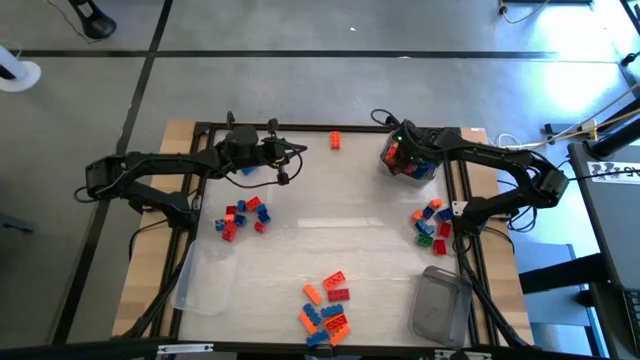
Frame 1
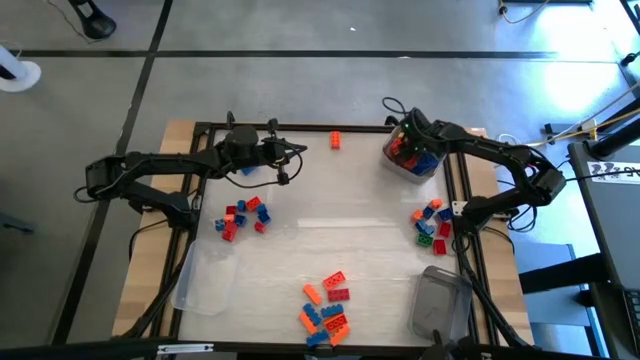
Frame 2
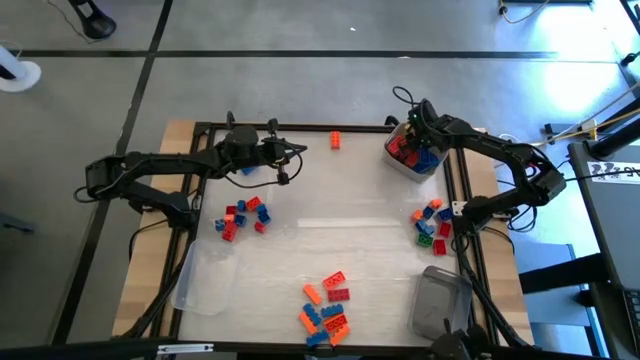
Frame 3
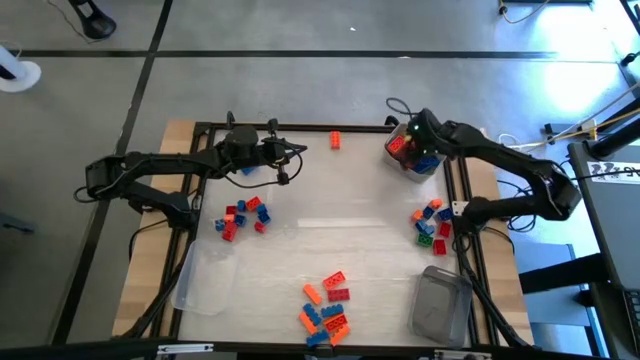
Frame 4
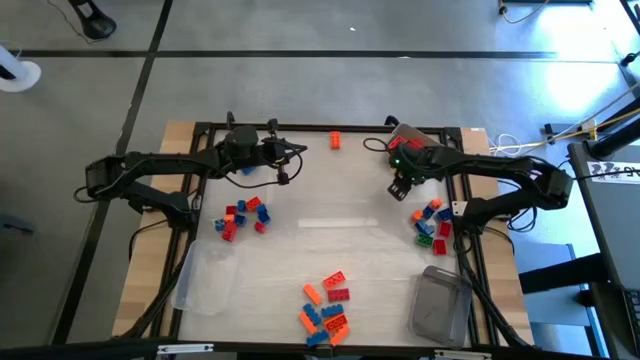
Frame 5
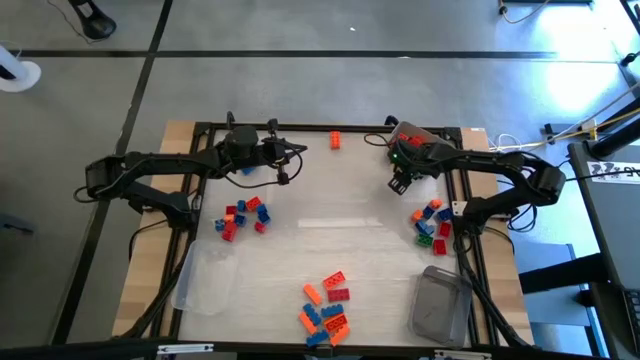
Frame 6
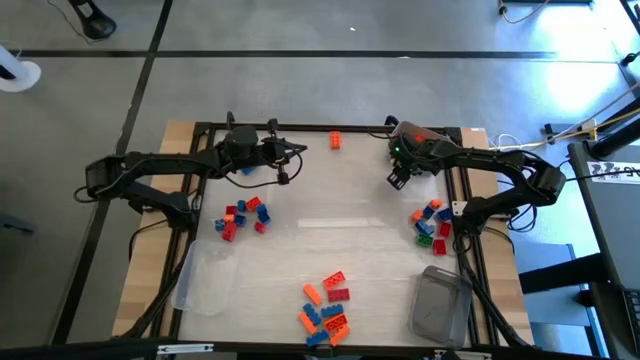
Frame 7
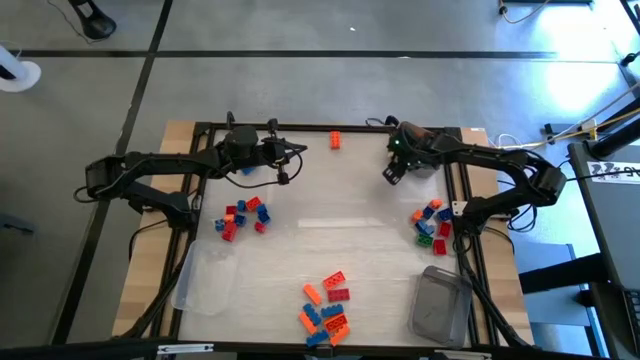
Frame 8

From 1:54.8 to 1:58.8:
Task: Sort blocks by size
Adjust the gray bin

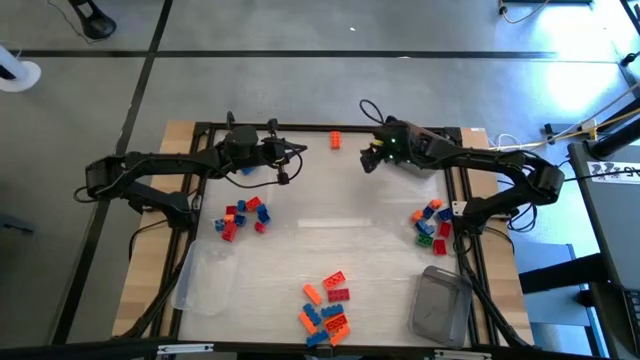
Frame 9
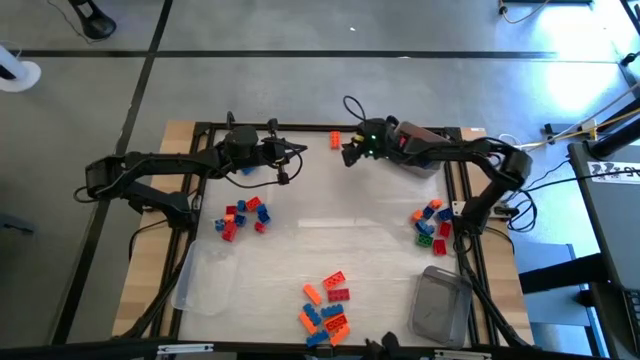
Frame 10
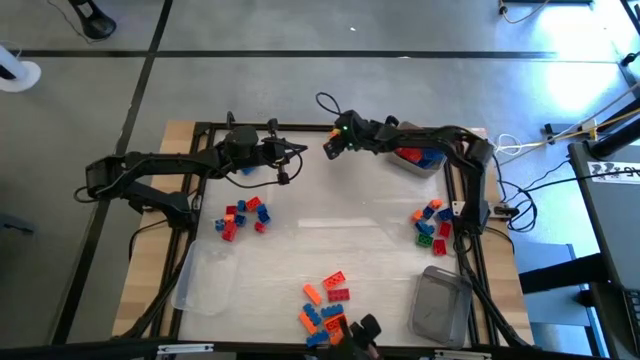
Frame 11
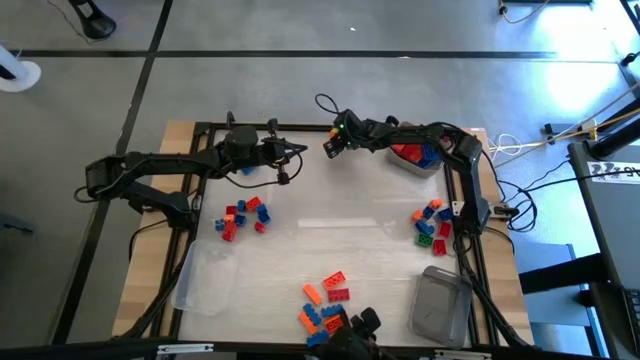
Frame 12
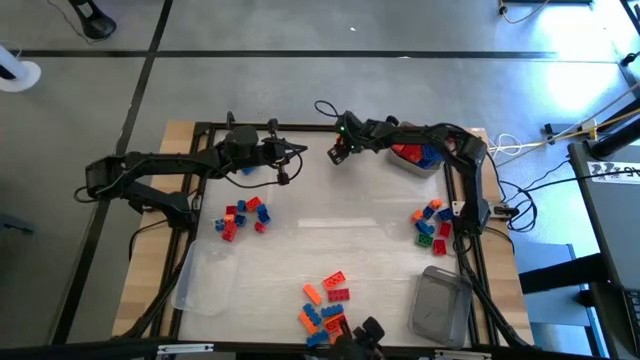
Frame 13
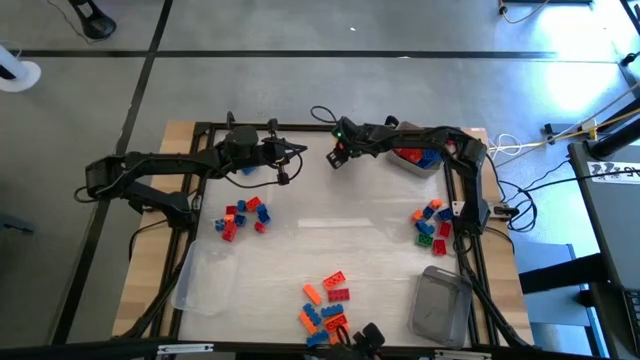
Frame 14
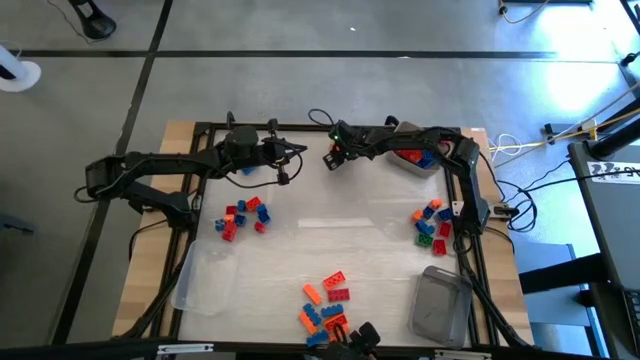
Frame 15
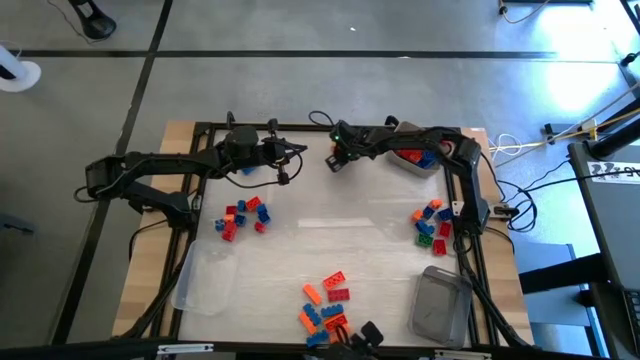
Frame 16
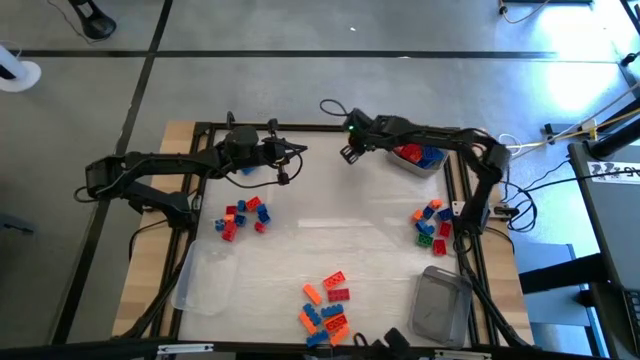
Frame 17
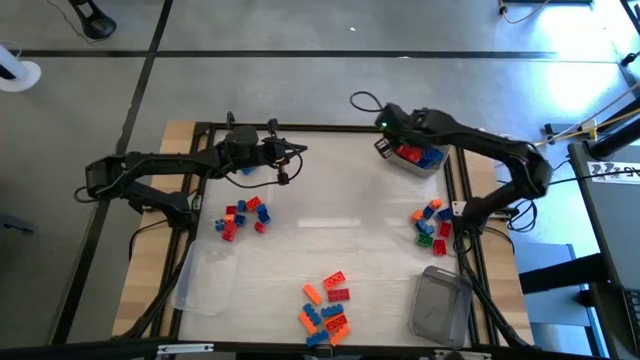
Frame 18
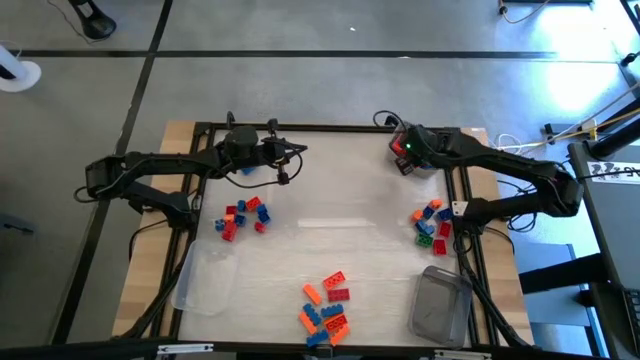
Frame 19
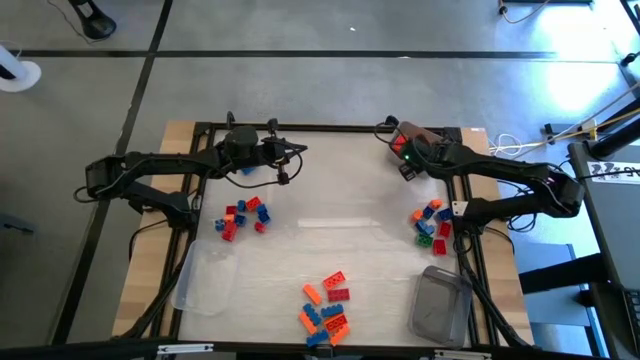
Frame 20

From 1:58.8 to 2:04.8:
Put the orange game piece into the gray bin

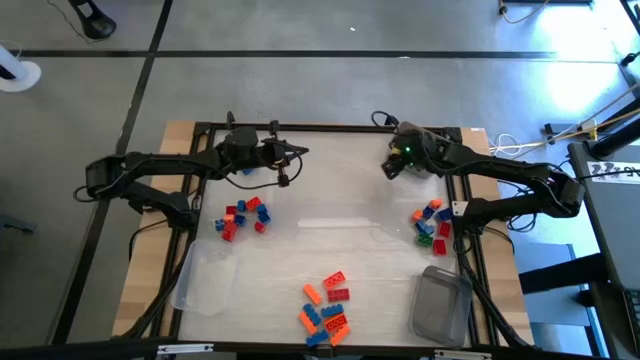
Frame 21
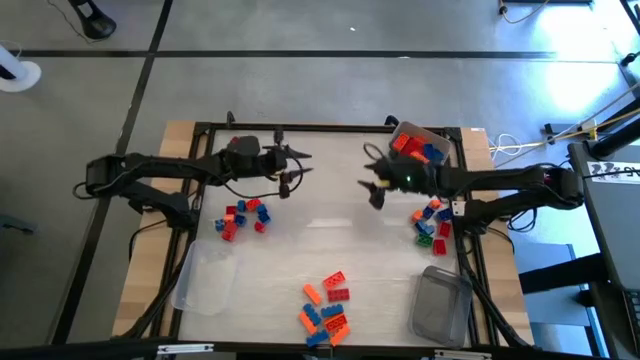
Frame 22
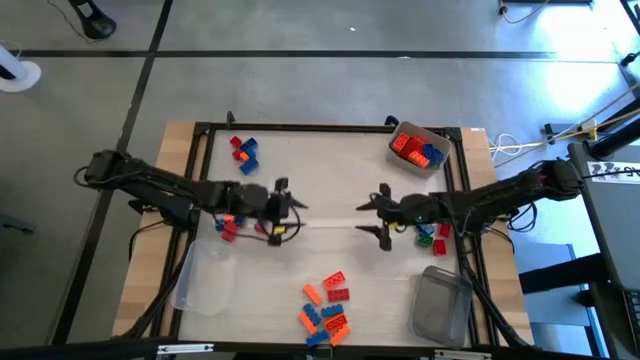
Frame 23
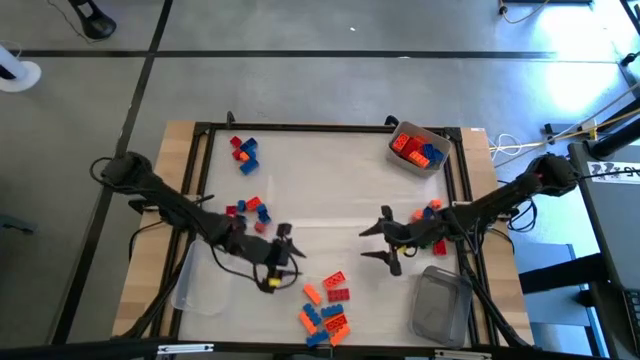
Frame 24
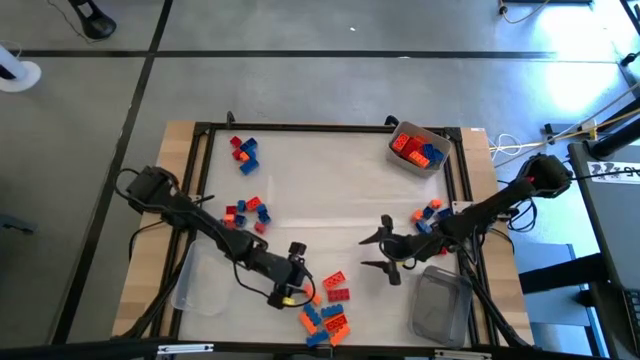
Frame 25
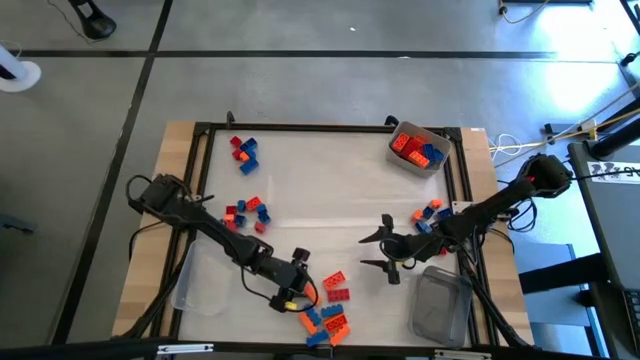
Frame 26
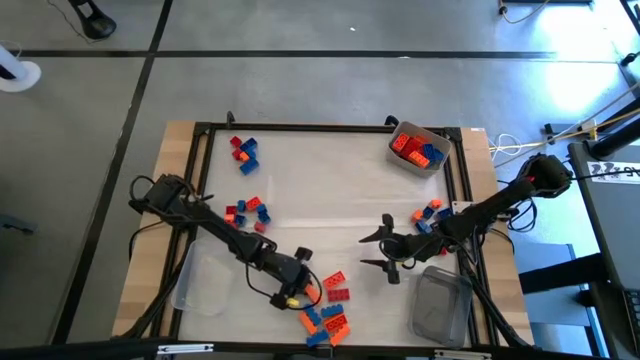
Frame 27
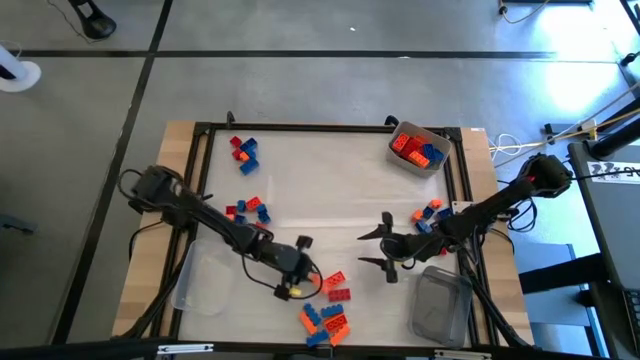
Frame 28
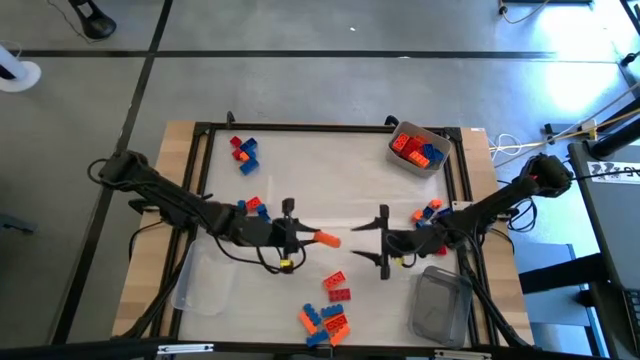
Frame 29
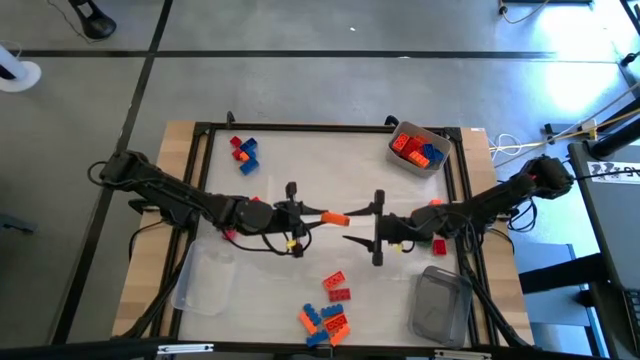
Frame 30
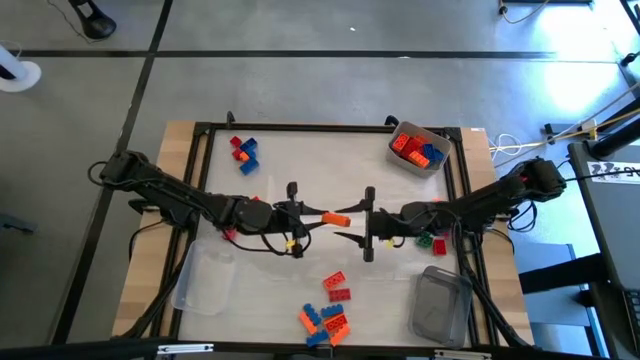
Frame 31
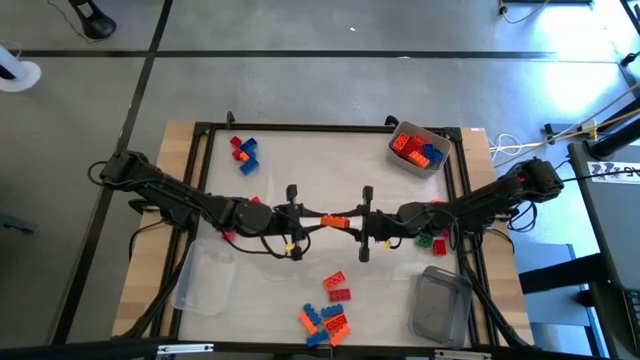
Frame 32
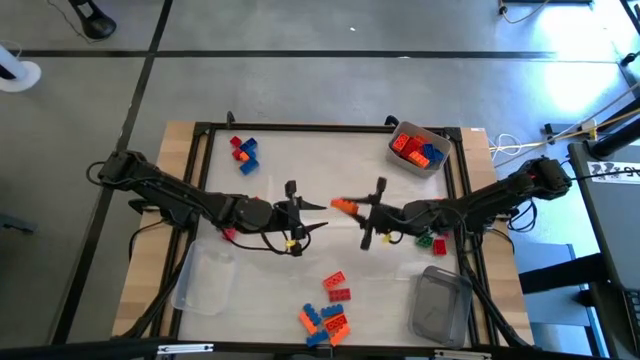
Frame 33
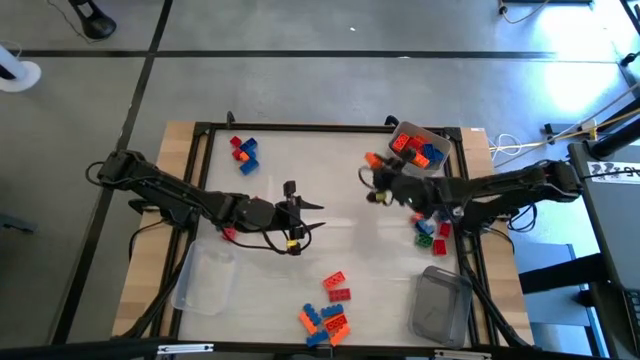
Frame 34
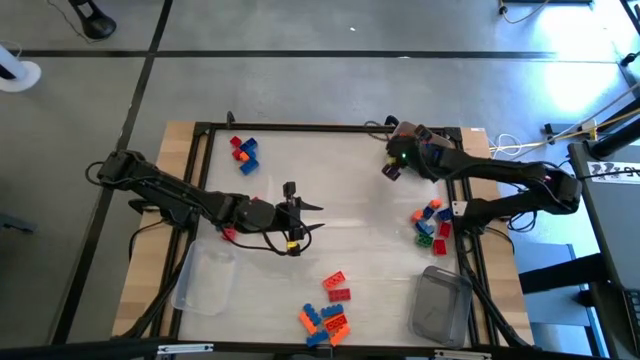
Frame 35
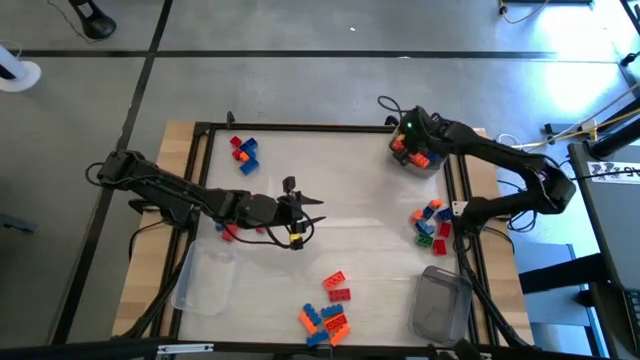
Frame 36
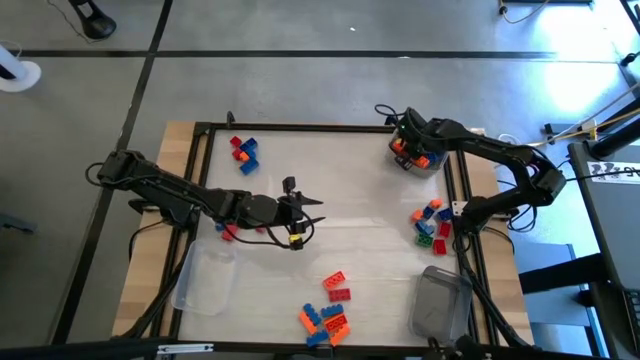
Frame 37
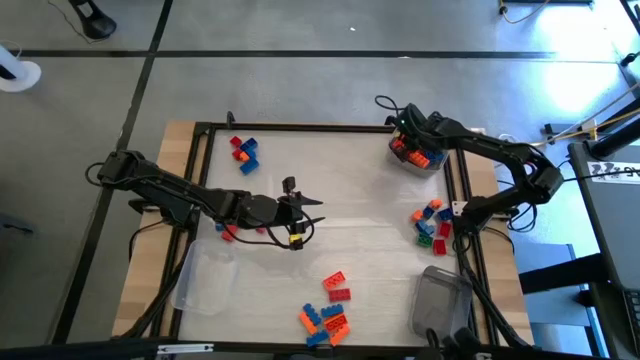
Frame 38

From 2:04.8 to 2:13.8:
Put the orange game piece into the gray bin
